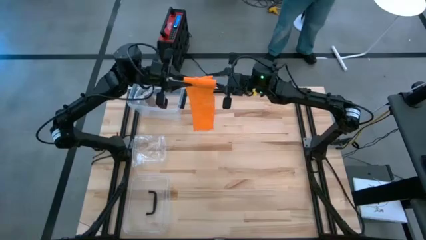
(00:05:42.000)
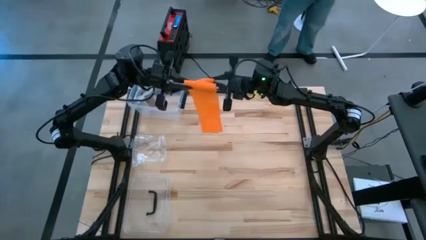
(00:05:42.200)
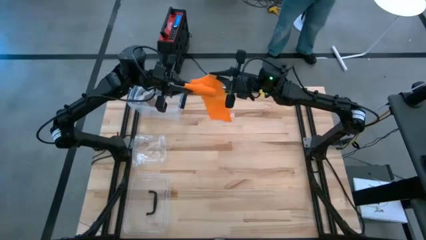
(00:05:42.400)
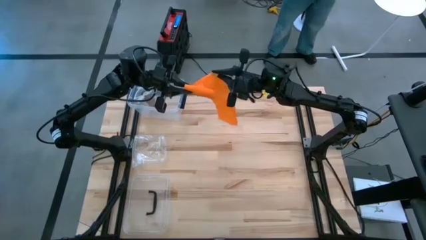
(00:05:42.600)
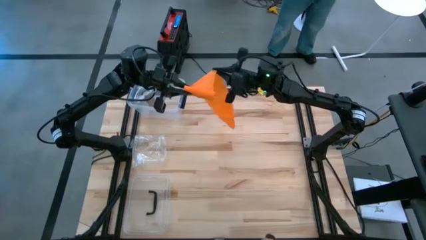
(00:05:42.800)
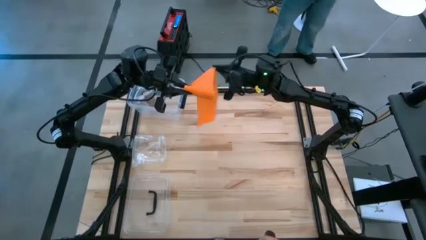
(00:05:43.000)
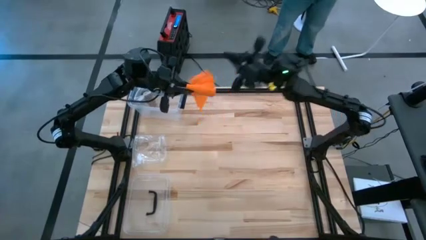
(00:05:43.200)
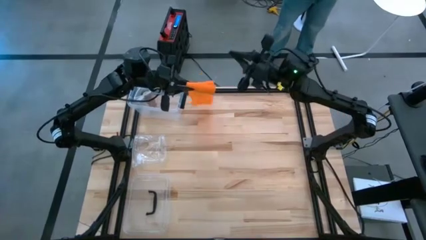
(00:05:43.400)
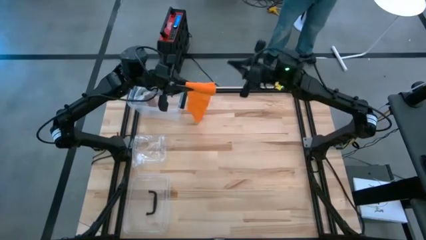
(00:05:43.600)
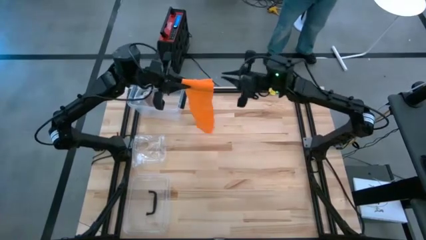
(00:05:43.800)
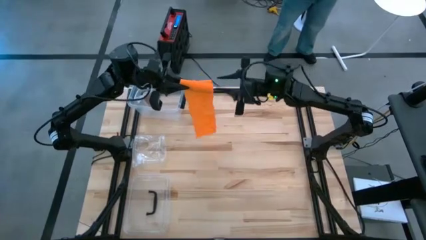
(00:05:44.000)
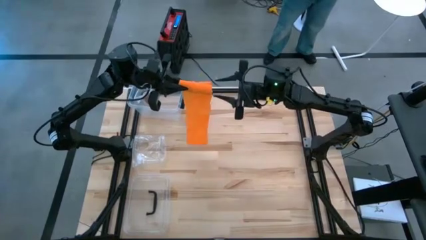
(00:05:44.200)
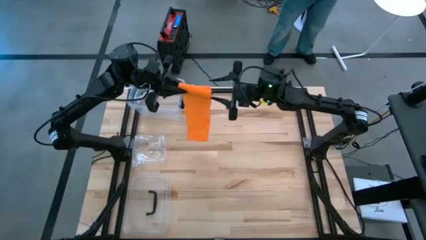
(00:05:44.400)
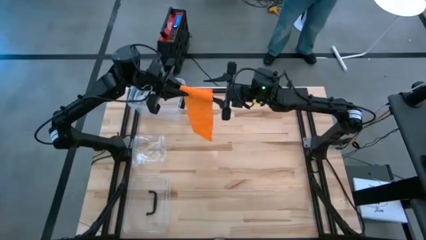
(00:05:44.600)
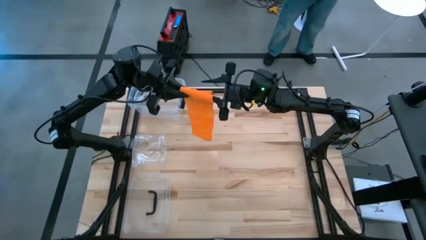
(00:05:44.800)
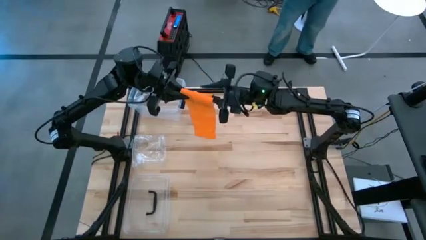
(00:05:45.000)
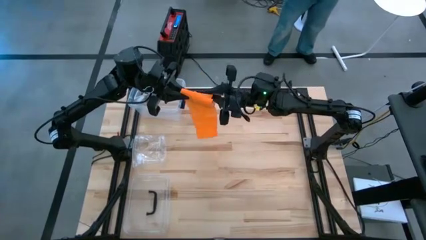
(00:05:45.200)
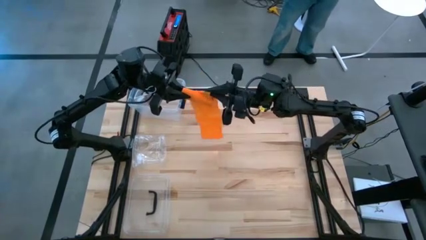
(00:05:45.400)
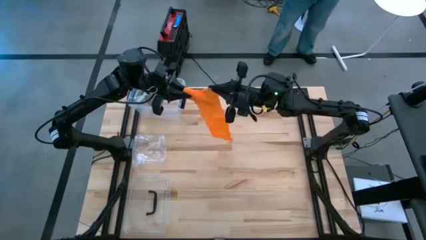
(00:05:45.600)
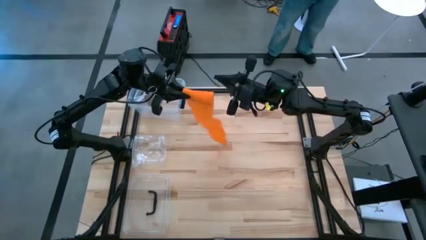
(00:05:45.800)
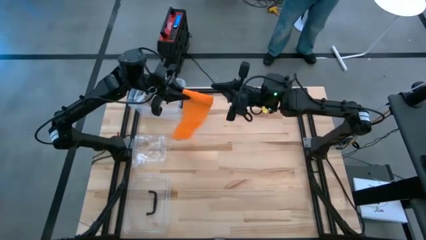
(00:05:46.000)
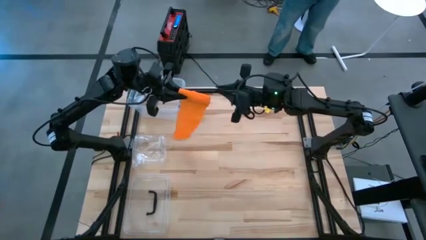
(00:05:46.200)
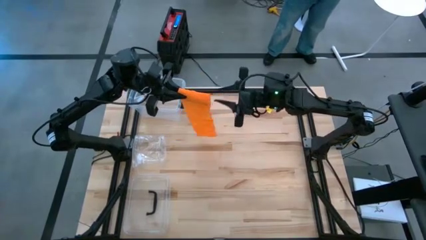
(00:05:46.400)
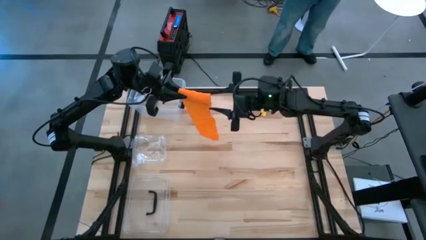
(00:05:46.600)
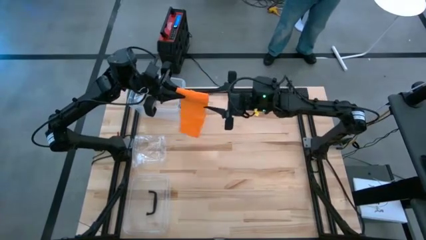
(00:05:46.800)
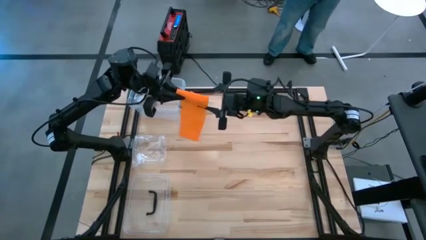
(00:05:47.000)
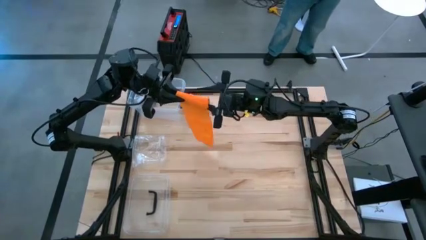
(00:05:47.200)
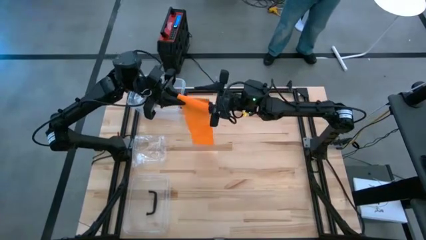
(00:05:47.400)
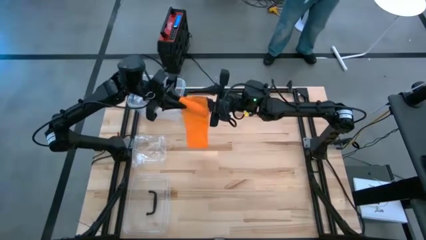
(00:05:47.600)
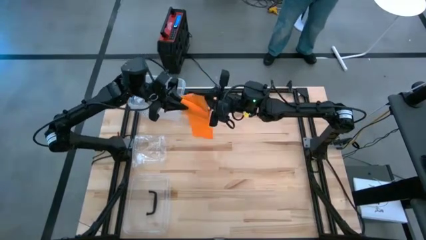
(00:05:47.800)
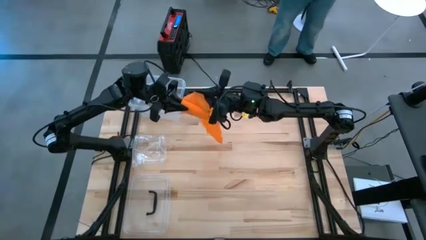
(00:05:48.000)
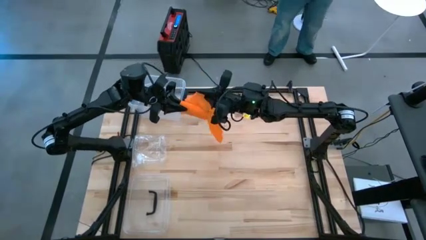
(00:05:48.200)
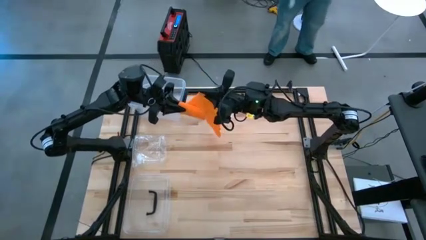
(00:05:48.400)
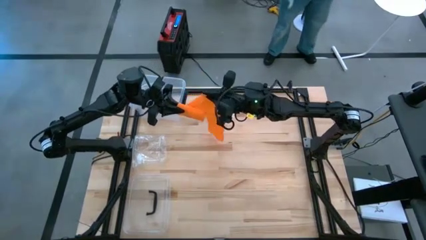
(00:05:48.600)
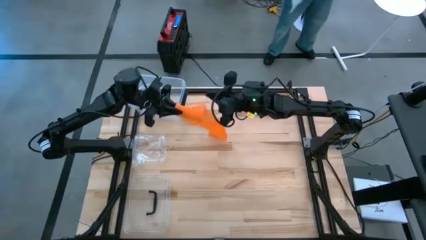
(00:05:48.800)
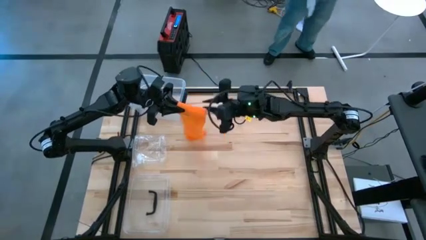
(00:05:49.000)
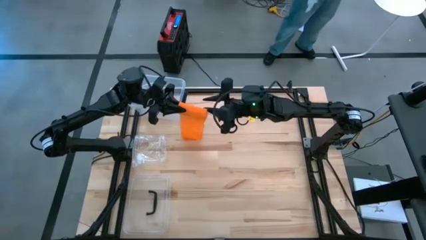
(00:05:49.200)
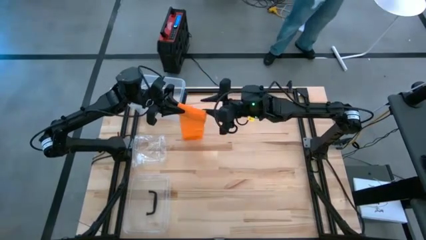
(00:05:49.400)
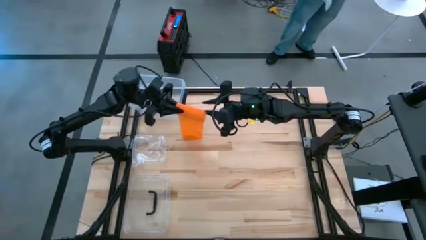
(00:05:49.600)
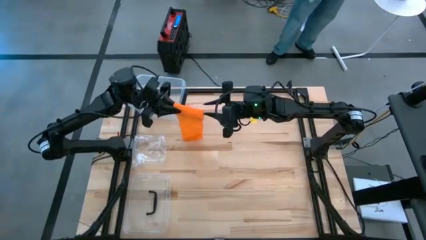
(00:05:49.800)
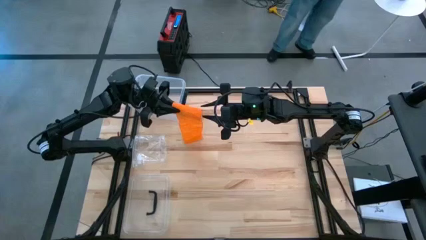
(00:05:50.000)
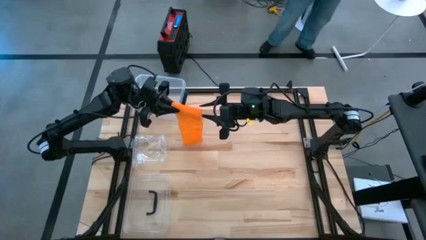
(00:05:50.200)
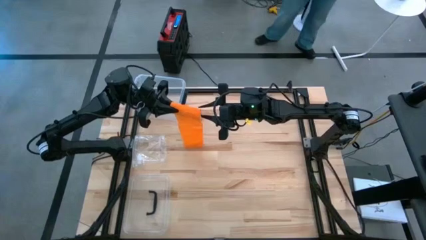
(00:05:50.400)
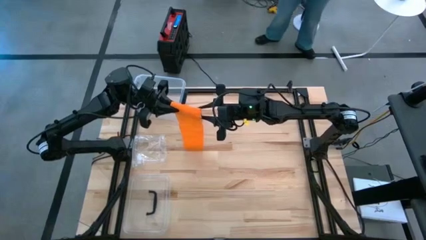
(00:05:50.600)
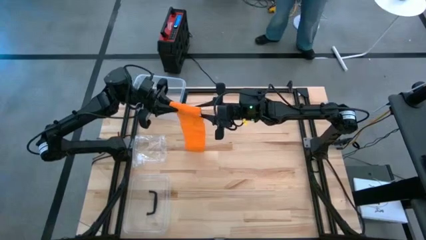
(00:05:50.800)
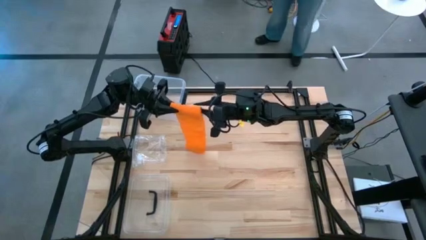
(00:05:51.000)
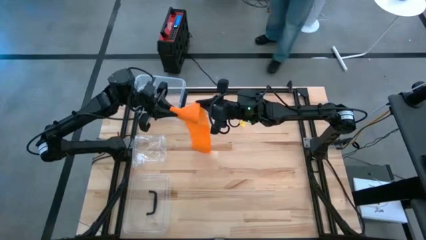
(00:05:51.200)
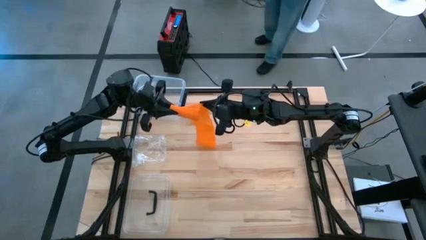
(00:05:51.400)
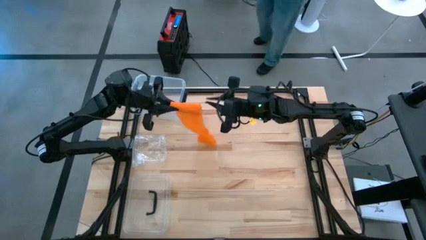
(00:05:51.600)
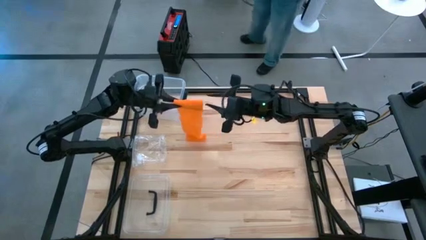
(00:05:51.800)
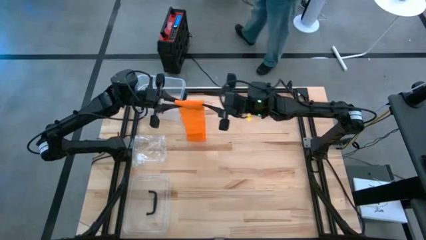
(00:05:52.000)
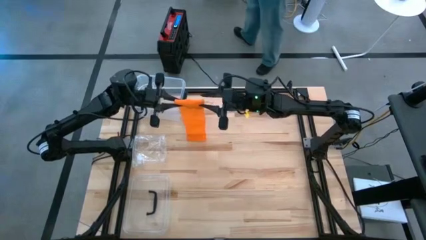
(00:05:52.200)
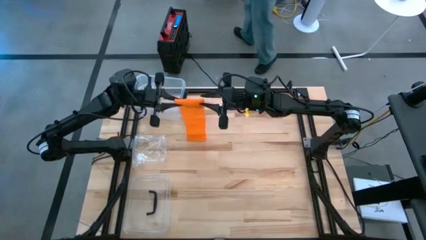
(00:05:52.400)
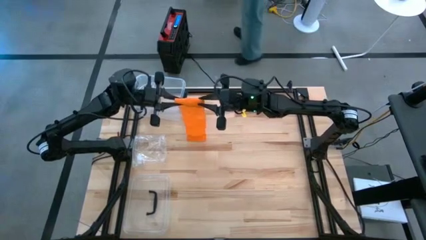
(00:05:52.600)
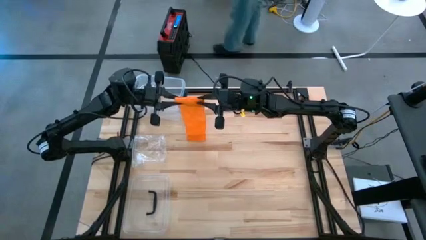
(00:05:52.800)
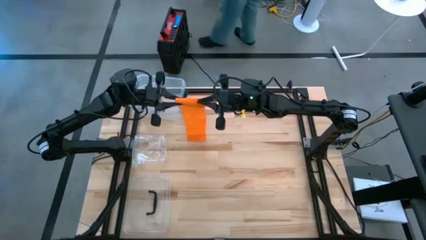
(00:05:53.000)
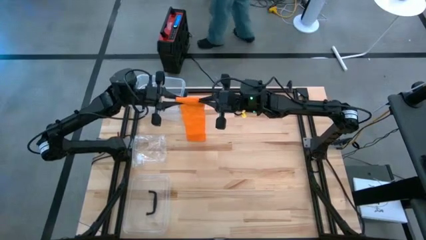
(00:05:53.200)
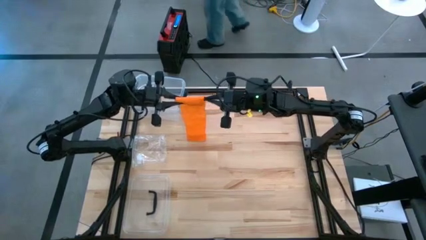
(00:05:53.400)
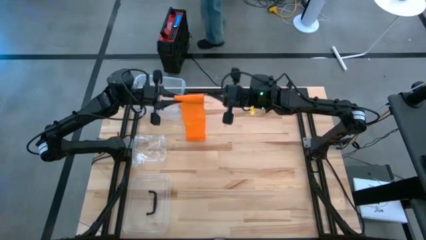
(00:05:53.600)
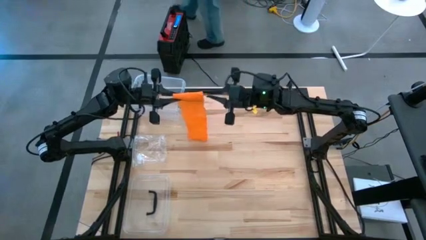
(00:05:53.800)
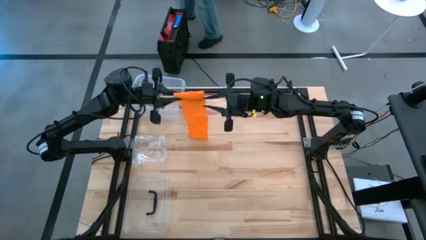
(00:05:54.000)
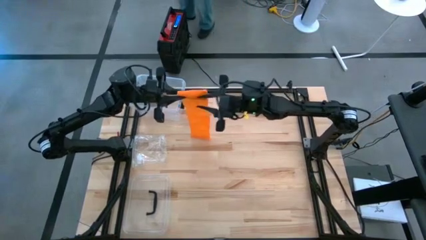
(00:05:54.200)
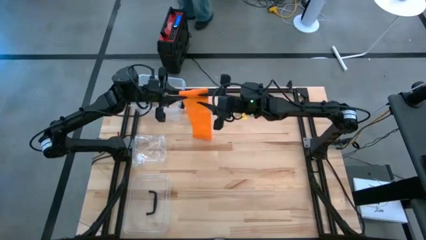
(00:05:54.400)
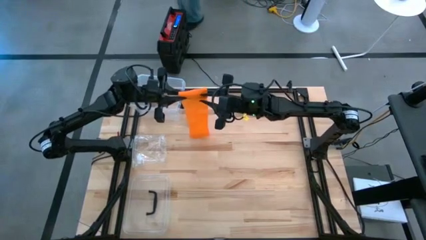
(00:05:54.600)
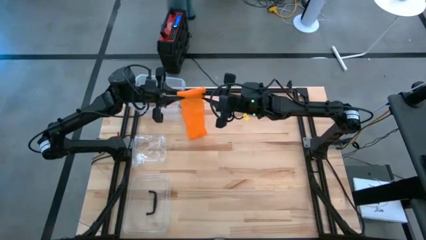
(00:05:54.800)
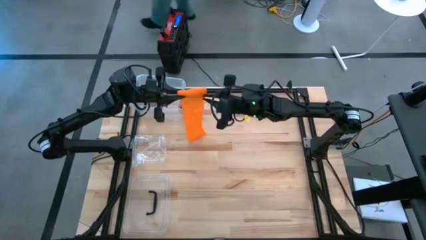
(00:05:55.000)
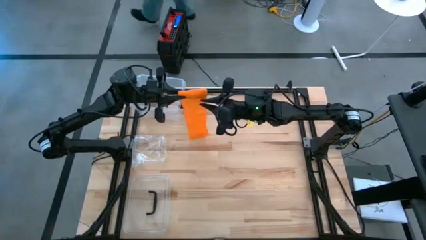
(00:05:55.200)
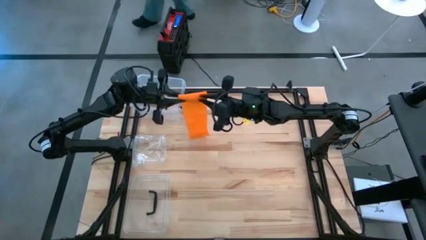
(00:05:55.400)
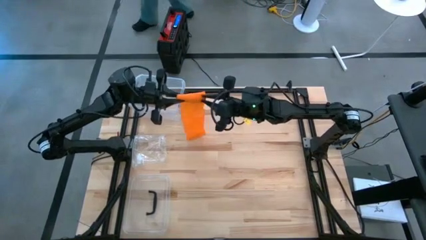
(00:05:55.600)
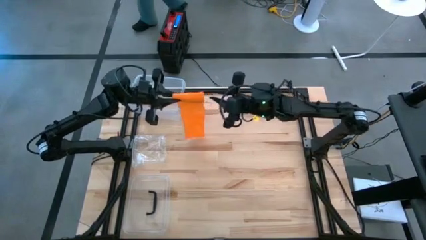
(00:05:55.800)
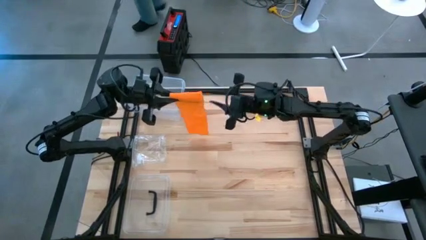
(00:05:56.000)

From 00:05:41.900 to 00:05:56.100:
Task: Roll bandage
Roll the orange bandage

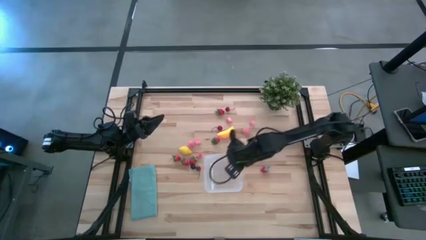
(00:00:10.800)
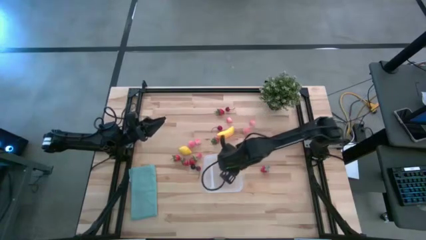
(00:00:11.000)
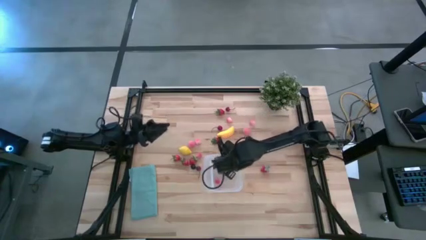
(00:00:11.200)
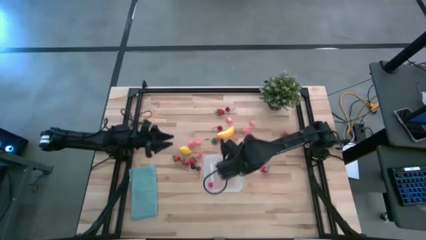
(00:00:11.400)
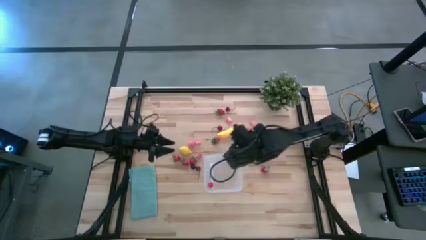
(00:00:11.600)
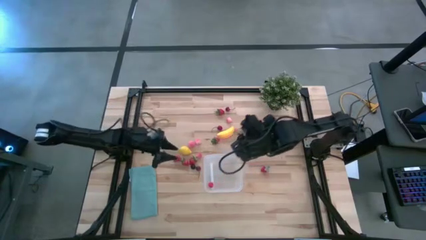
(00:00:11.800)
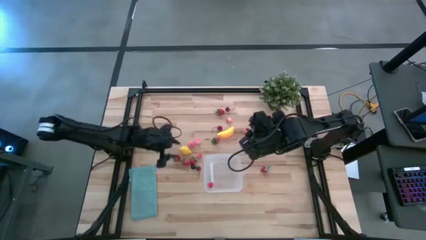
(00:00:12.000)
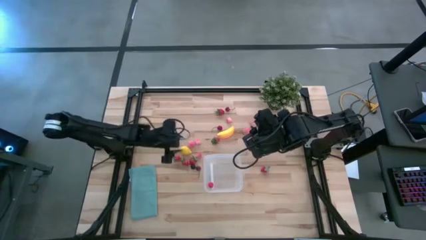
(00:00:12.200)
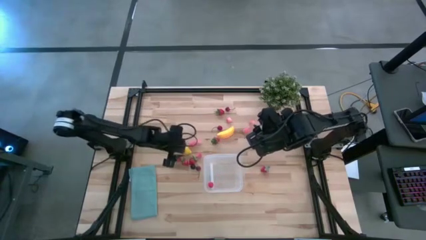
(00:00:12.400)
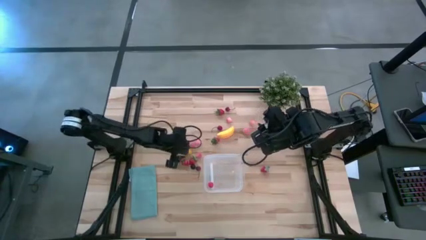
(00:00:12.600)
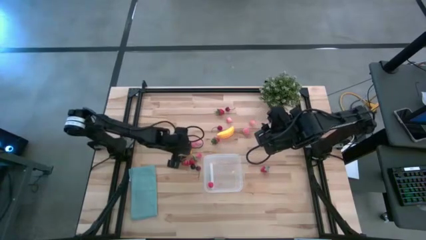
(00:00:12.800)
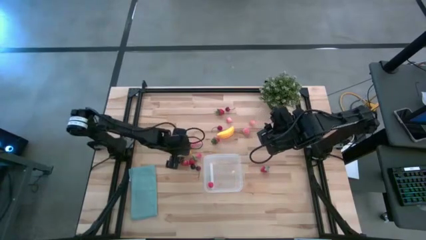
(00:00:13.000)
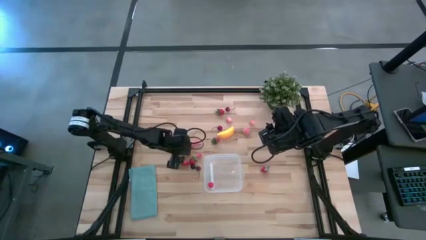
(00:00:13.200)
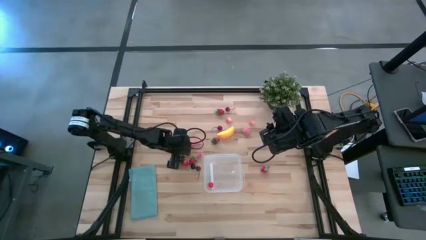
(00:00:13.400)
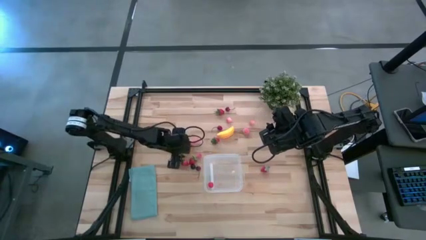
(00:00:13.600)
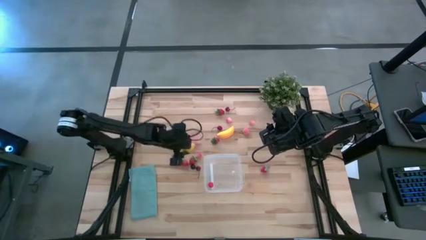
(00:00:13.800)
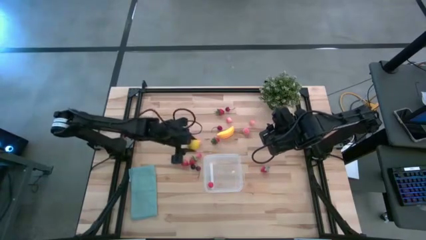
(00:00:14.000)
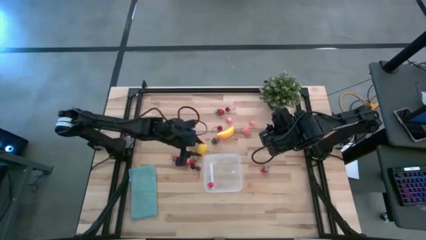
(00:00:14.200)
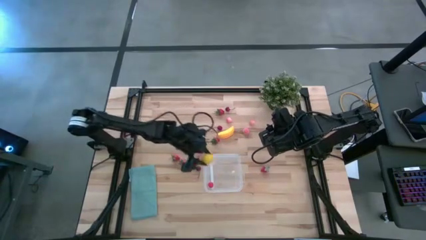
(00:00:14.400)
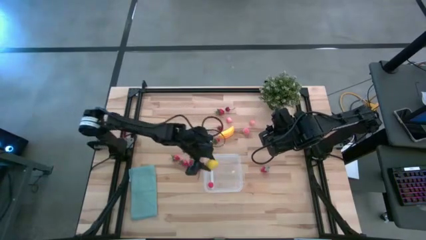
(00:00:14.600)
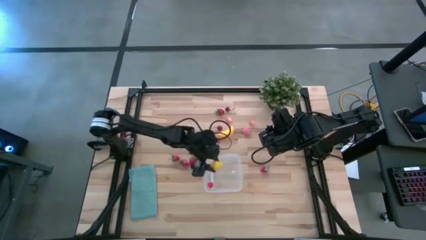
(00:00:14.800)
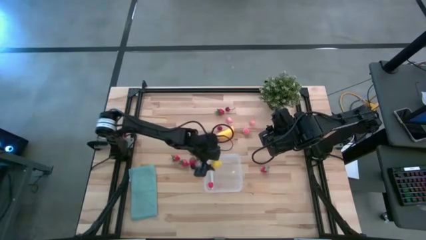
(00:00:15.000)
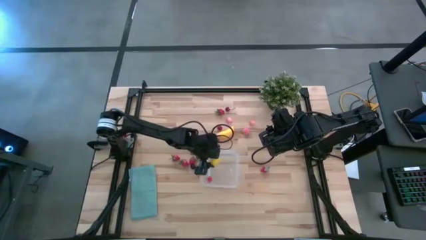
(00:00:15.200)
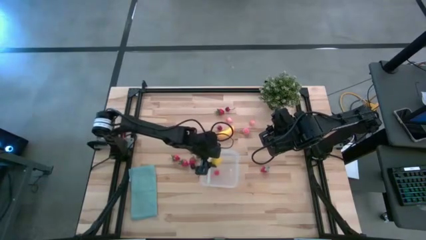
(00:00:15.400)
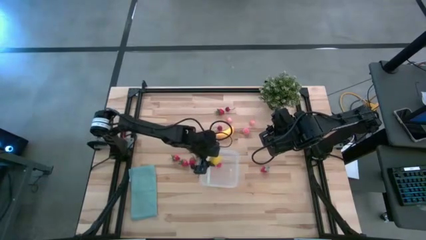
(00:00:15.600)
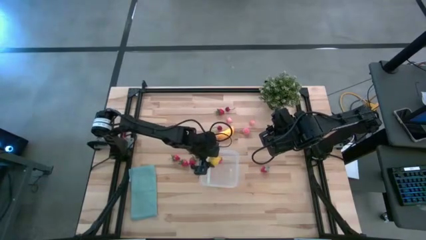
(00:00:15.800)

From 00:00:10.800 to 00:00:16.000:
Task: Pick and placing Produce into tupperware
Put the yellow lemon into the transparent container
